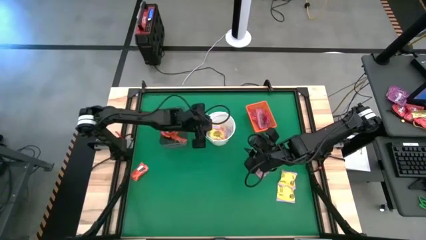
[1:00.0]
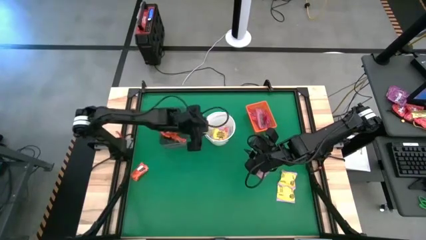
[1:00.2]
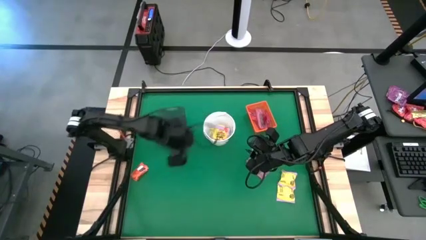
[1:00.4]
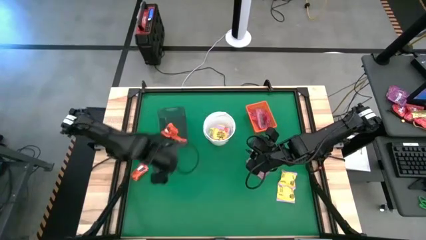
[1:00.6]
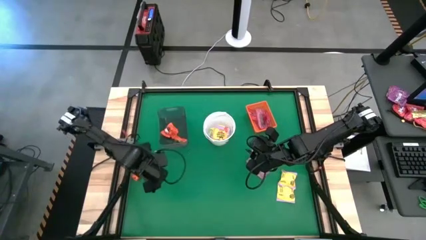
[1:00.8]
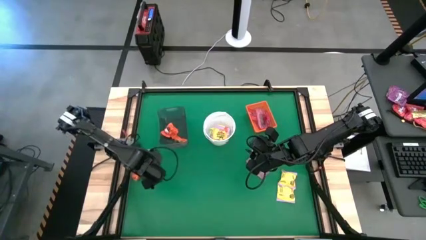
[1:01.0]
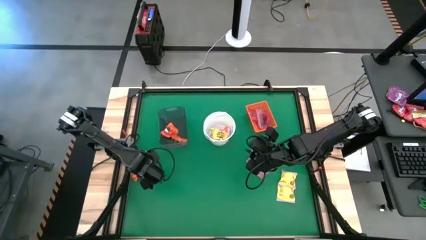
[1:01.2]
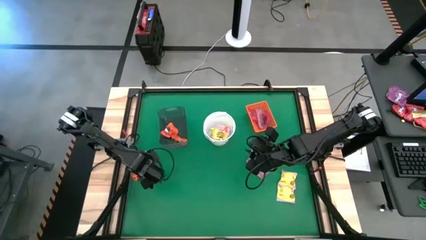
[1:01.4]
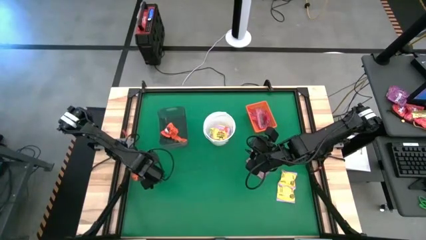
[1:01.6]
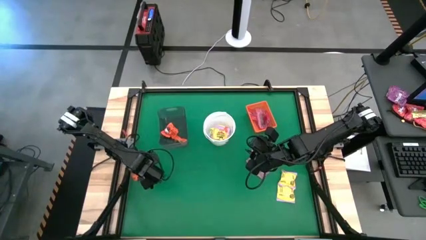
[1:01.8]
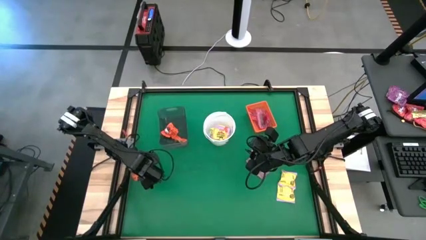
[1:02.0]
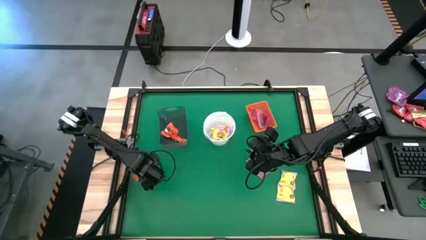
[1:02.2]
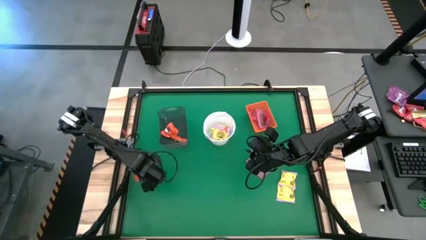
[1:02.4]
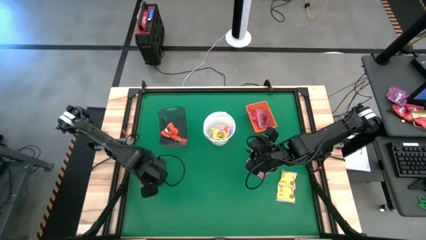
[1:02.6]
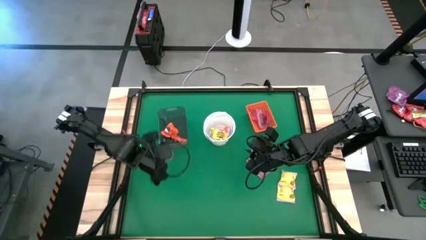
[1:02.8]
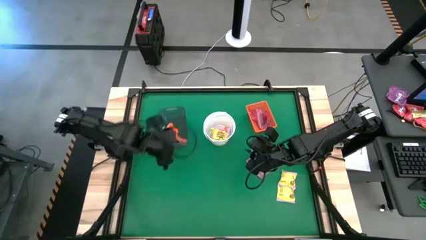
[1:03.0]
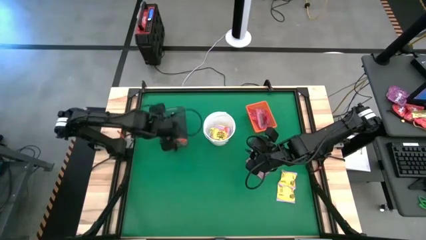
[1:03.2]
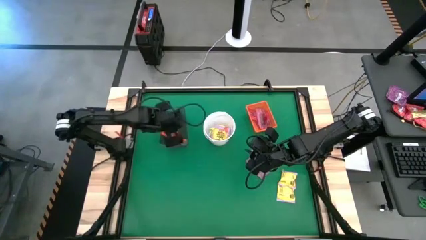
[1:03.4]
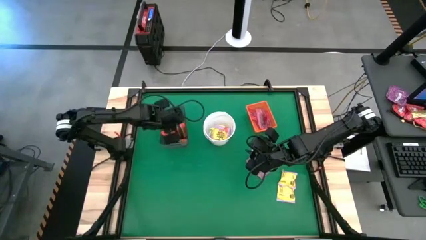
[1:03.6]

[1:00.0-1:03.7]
Task: Sort candy by brand, put in halloween buckets
Put the orange chocolate into the black bin

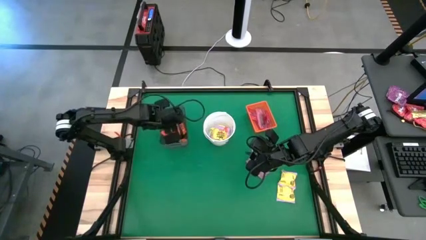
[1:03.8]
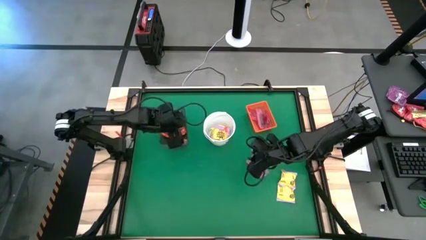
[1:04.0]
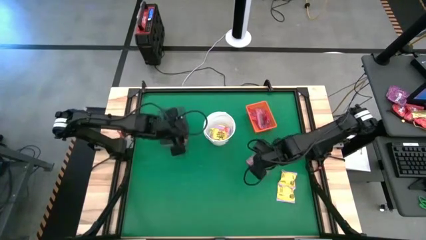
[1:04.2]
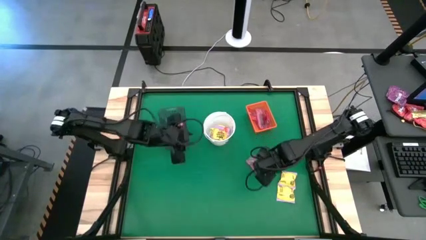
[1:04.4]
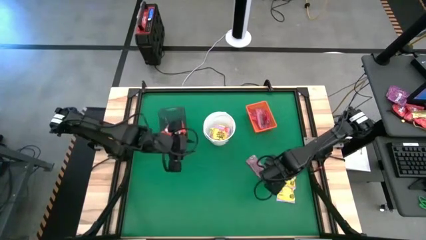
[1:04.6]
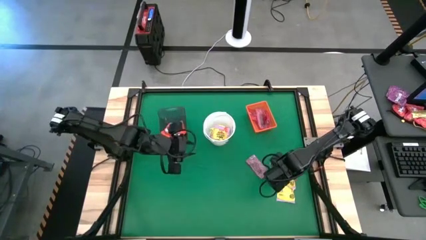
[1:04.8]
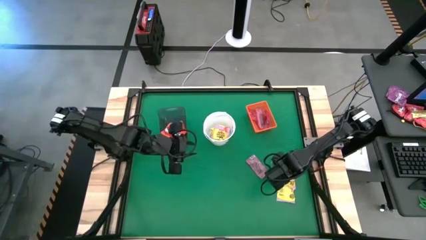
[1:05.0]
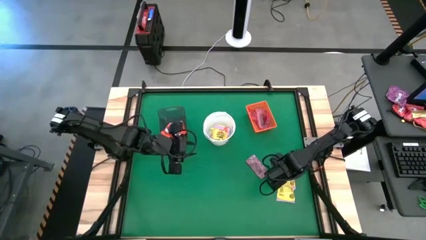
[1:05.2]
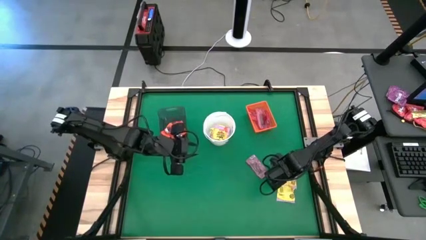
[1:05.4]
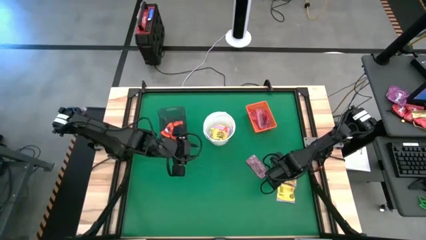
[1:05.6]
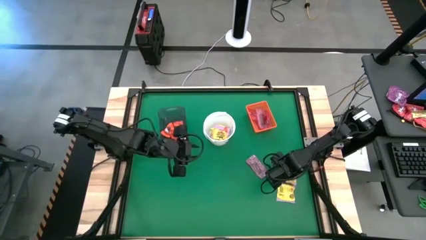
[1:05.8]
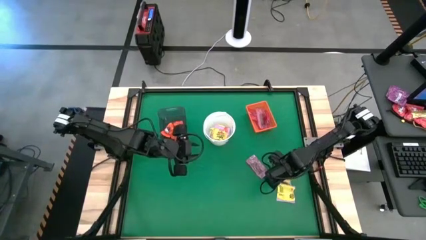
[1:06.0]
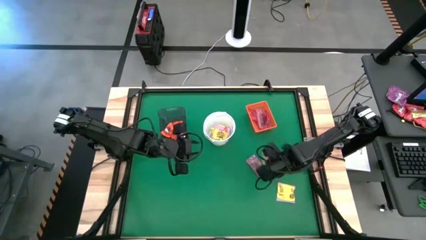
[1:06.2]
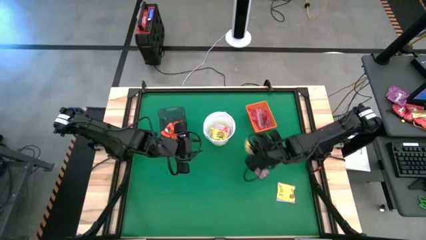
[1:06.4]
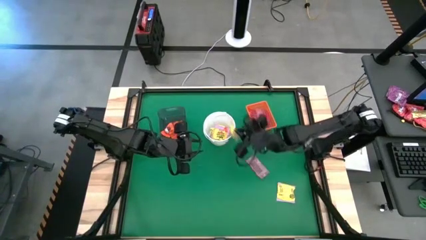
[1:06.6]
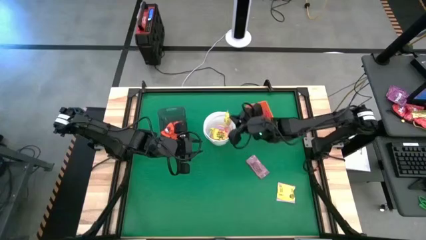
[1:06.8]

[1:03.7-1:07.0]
Put the yellow candy into the white bucket

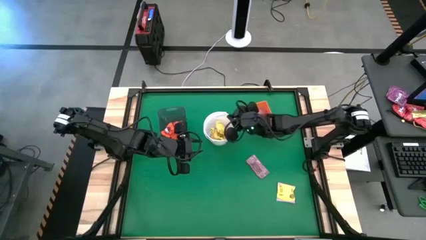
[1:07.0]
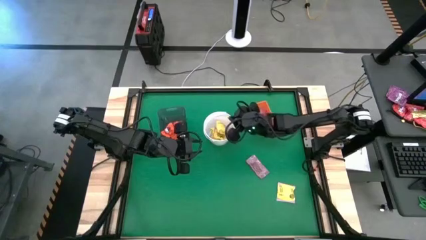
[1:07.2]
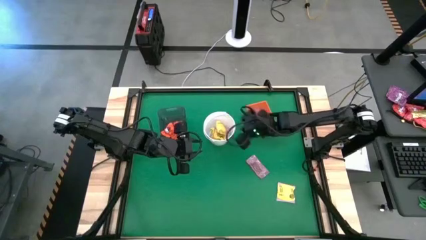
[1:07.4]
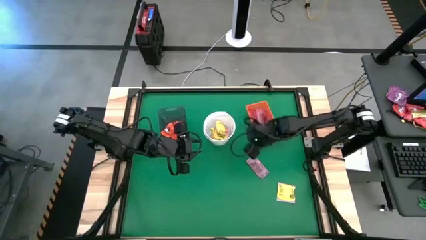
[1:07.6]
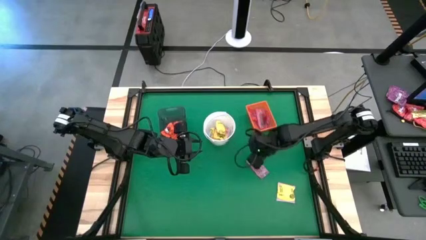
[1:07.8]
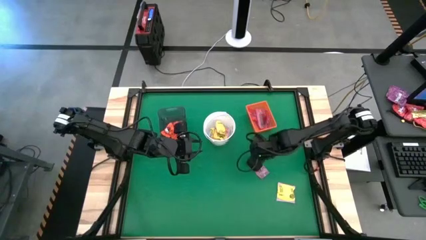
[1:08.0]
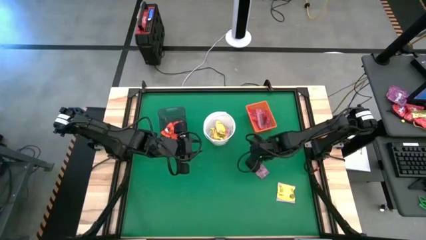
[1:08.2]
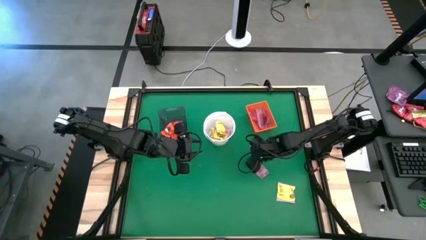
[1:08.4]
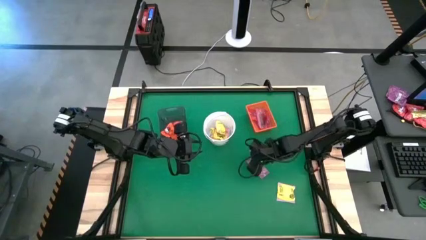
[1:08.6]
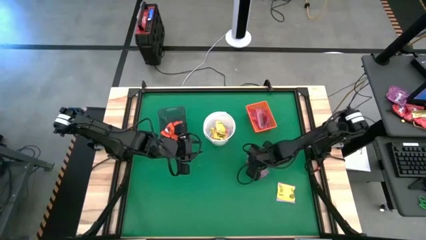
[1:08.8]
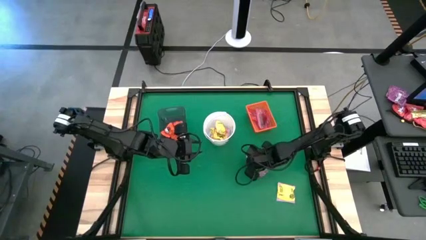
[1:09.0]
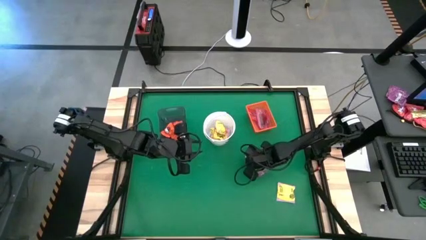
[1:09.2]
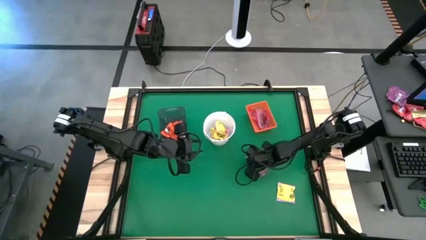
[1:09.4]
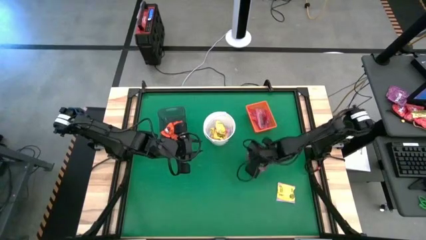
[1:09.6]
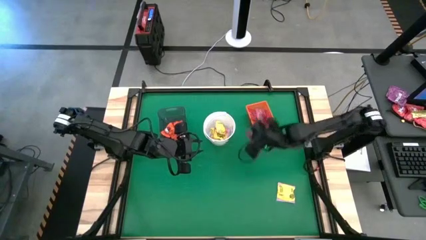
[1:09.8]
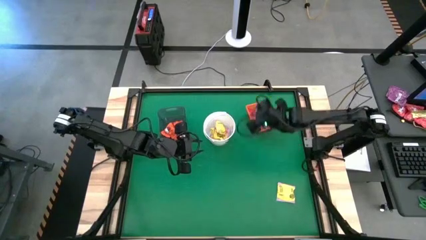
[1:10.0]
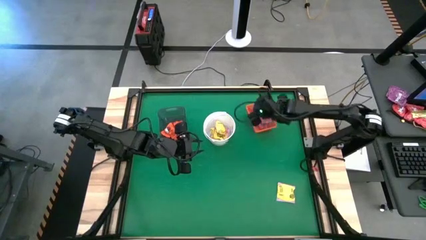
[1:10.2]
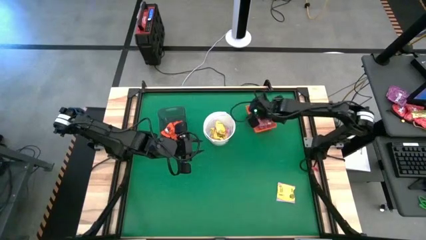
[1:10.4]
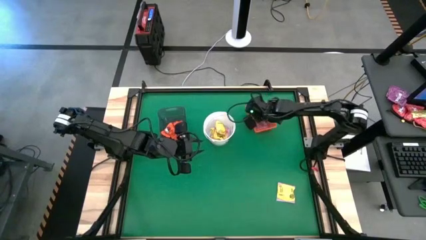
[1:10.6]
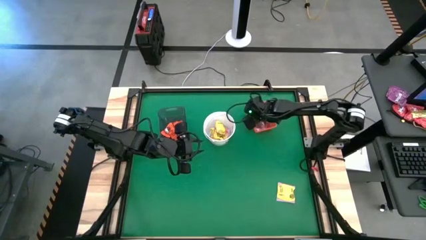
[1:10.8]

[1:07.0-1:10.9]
Put the red candy into the orange bin

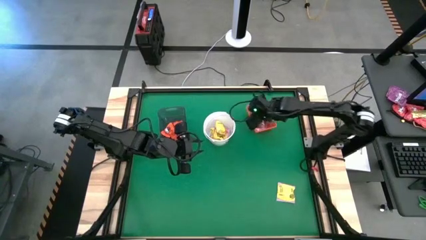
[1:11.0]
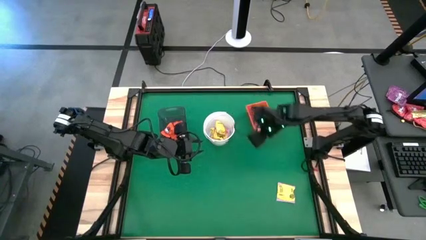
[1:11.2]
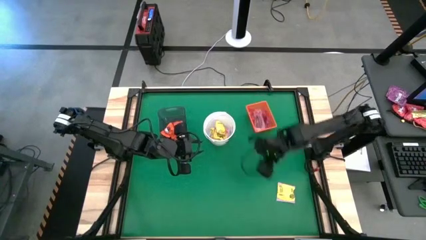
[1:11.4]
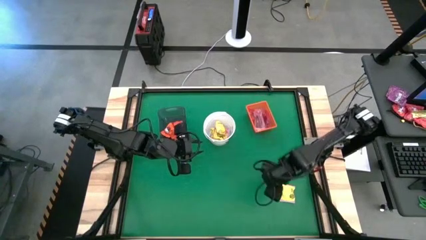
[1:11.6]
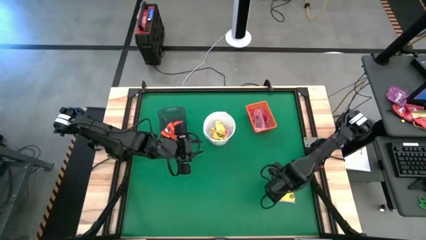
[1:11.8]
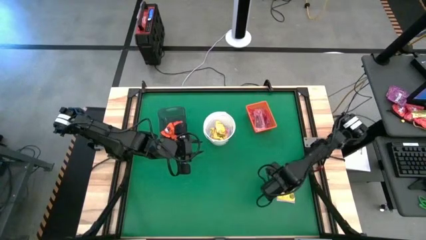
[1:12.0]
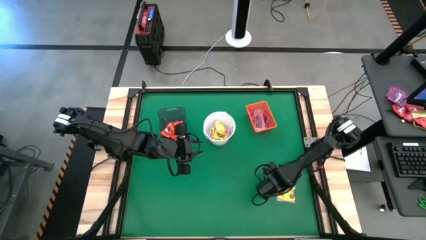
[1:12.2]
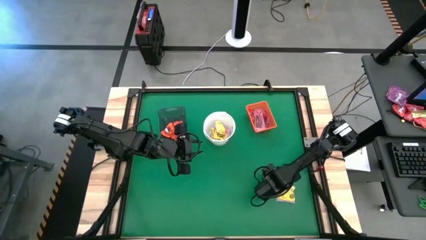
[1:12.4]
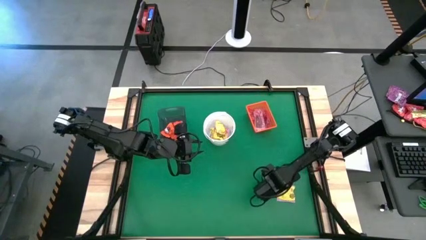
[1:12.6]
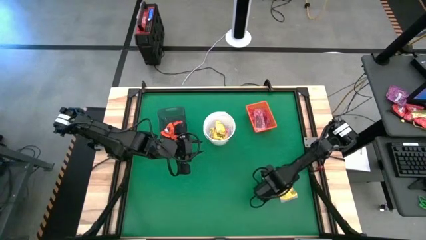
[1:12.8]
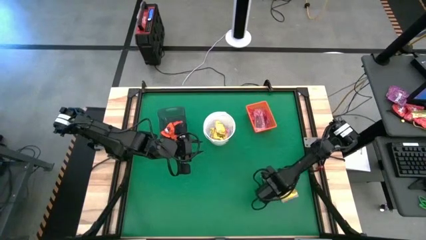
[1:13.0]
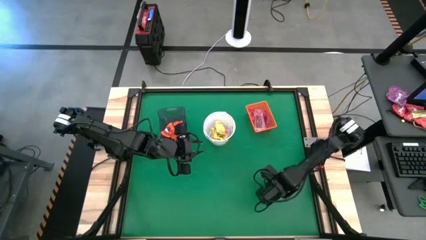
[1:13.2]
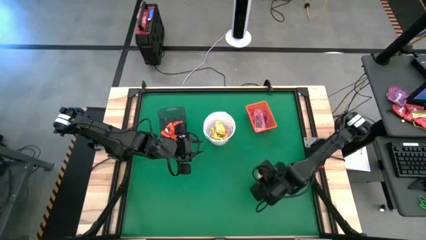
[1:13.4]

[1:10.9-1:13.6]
Put the yellow candy into the white bucket

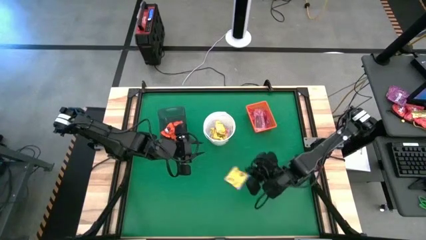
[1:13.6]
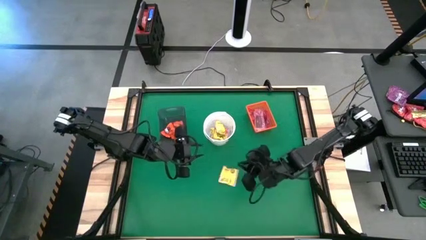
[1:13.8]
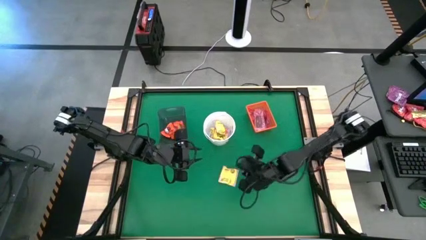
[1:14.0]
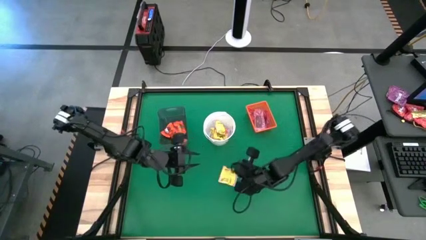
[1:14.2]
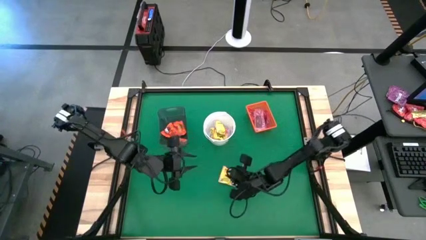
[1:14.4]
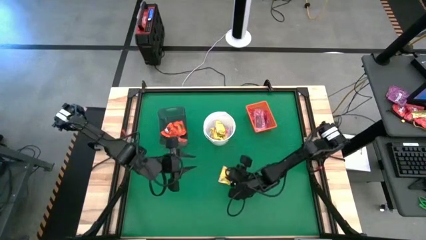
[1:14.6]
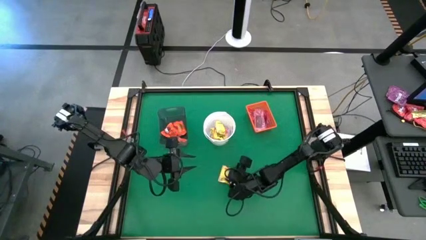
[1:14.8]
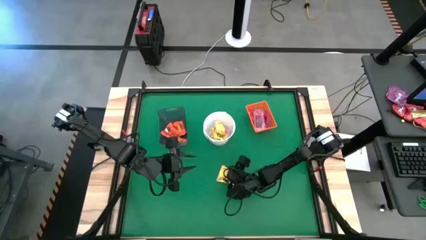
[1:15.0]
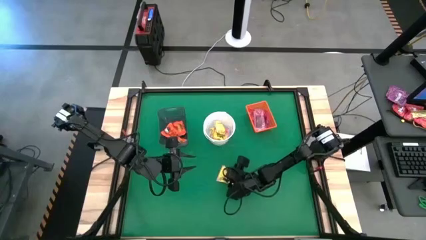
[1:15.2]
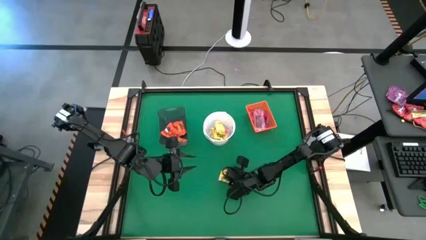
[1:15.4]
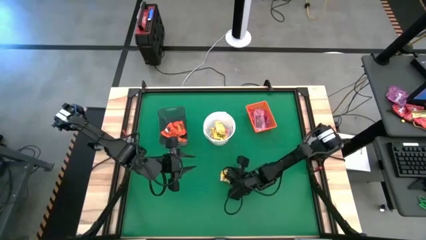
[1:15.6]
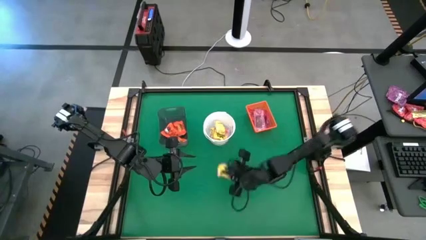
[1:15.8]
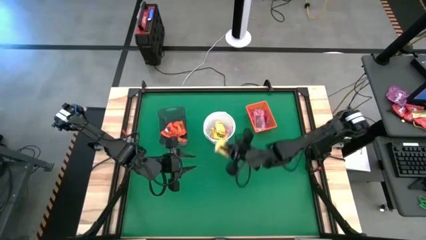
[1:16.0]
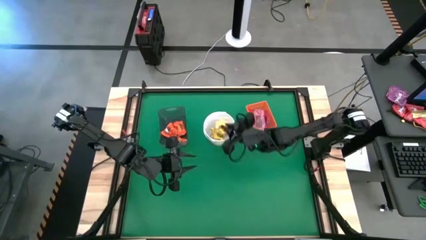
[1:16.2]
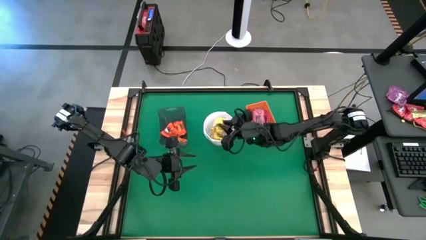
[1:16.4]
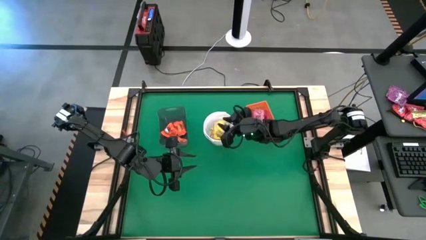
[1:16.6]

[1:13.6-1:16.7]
Put the yellow candy into the white bucket
